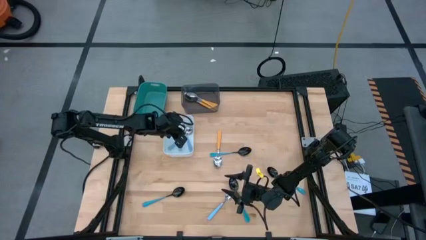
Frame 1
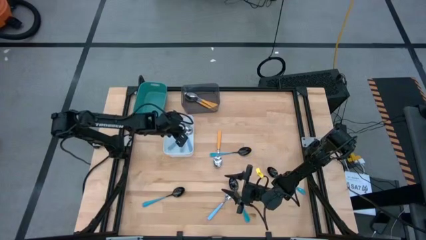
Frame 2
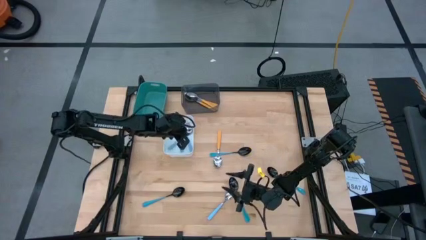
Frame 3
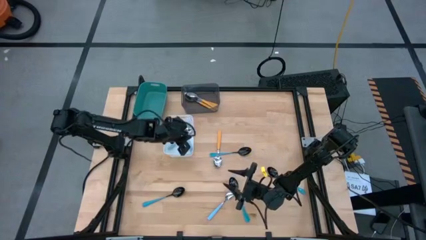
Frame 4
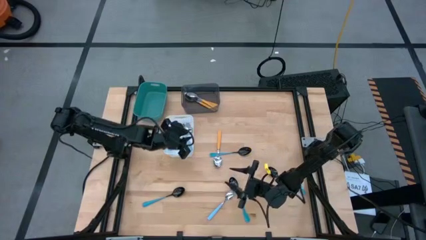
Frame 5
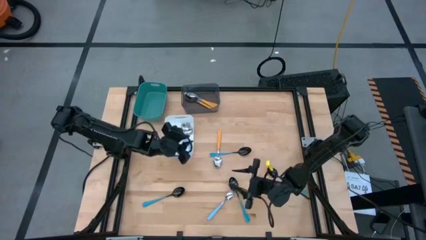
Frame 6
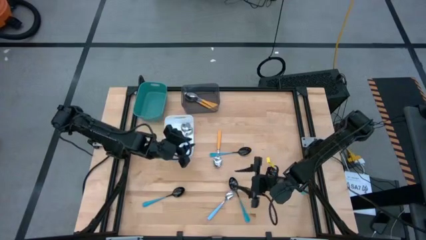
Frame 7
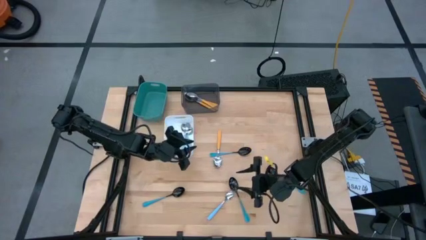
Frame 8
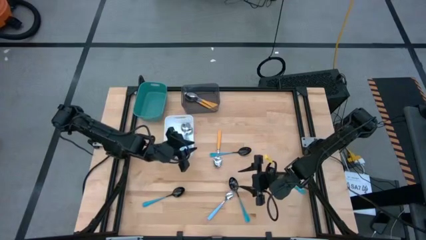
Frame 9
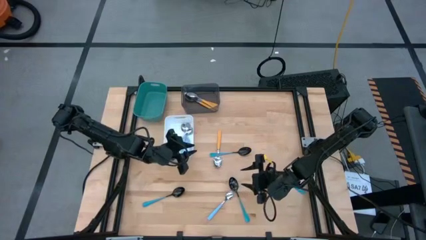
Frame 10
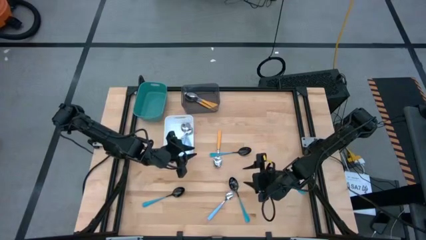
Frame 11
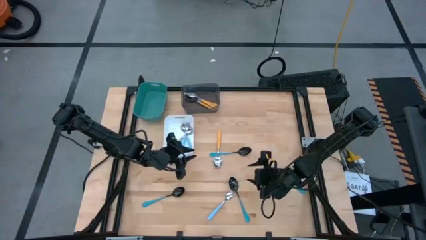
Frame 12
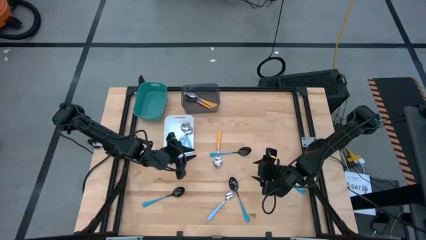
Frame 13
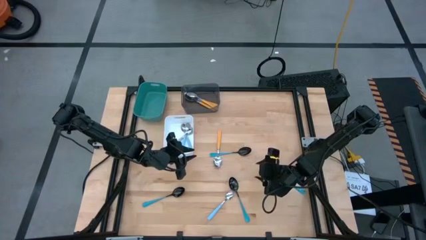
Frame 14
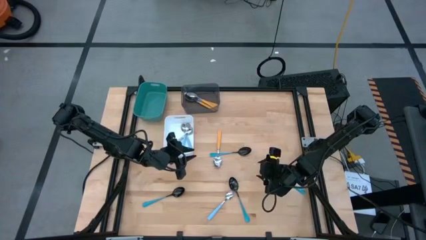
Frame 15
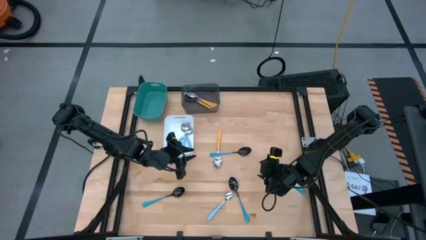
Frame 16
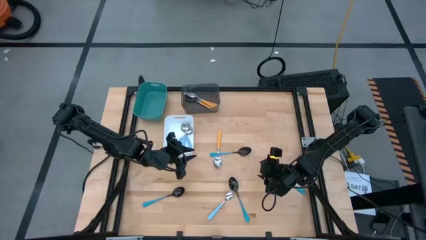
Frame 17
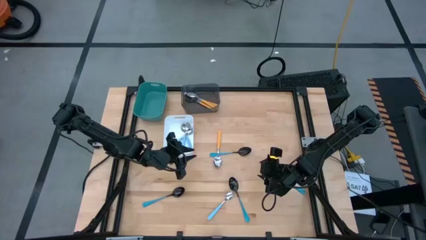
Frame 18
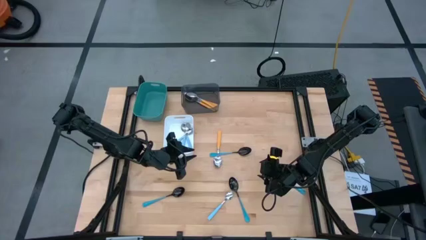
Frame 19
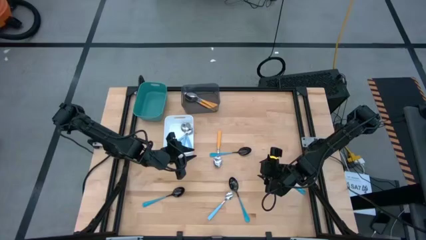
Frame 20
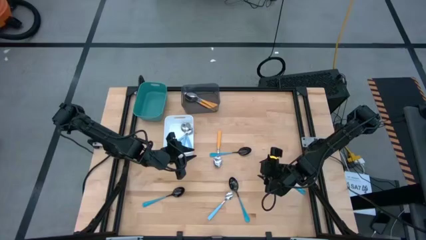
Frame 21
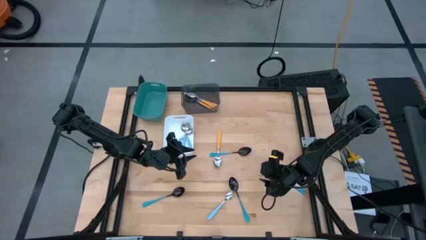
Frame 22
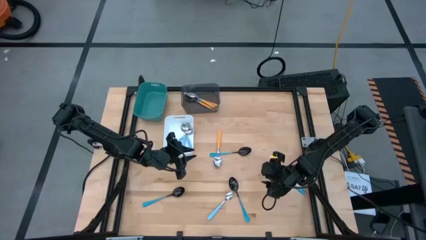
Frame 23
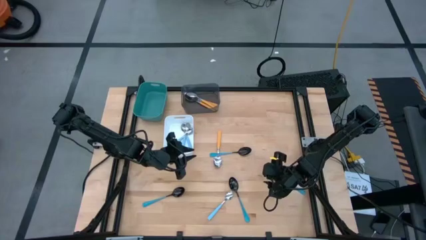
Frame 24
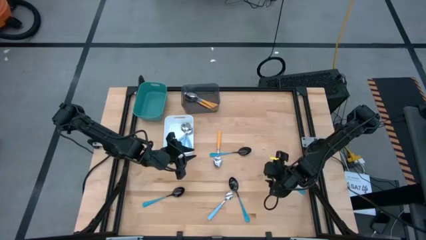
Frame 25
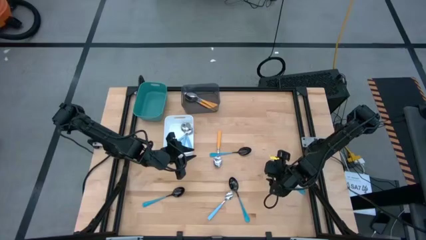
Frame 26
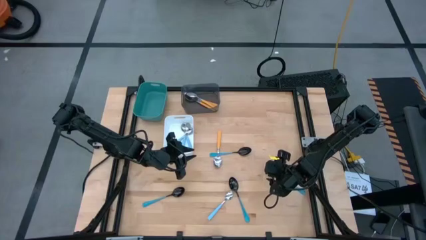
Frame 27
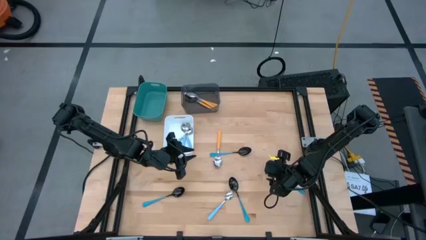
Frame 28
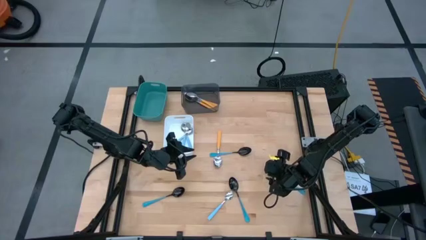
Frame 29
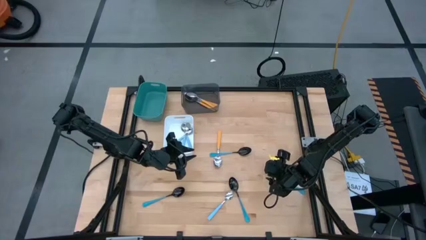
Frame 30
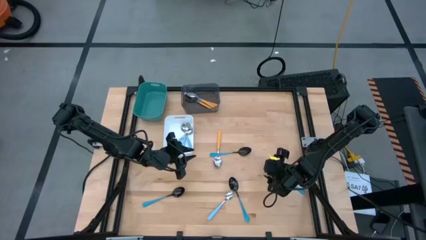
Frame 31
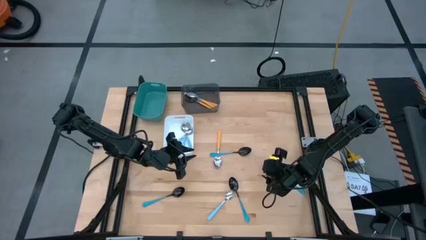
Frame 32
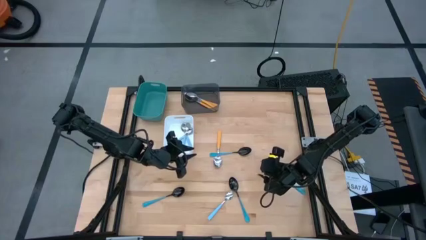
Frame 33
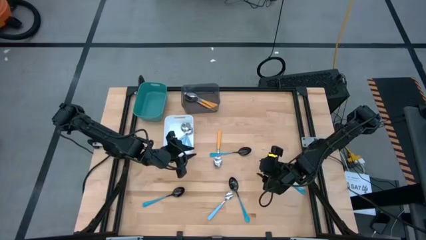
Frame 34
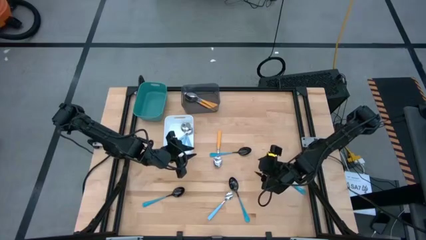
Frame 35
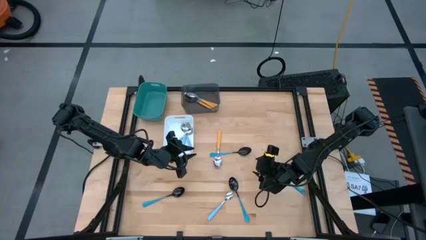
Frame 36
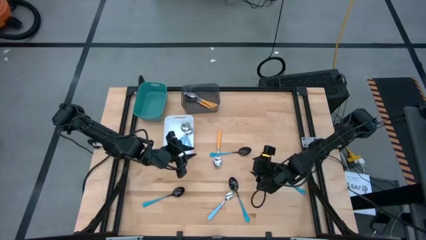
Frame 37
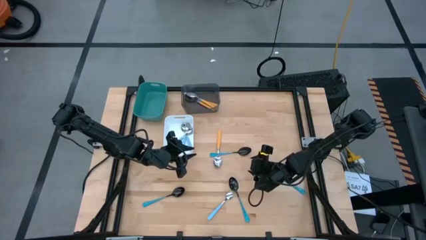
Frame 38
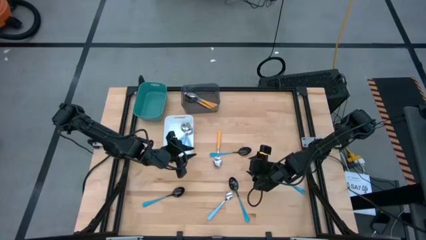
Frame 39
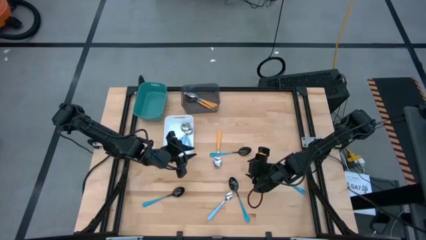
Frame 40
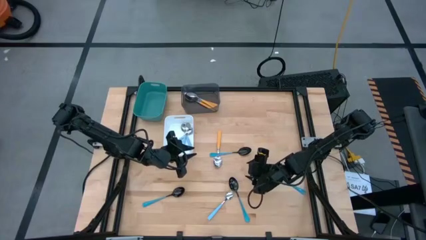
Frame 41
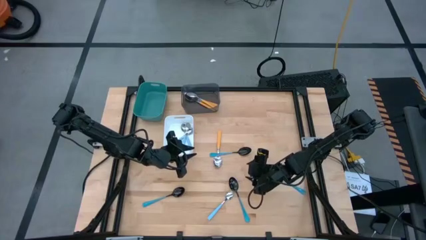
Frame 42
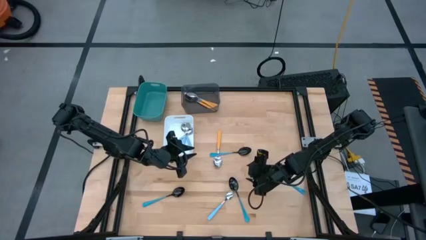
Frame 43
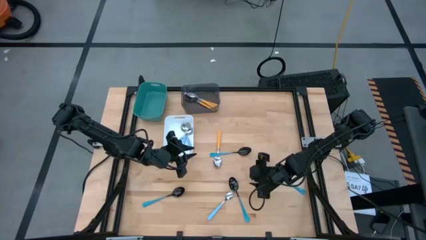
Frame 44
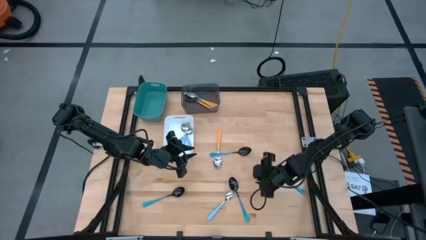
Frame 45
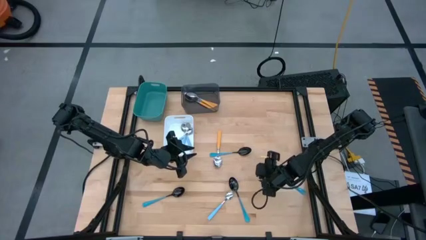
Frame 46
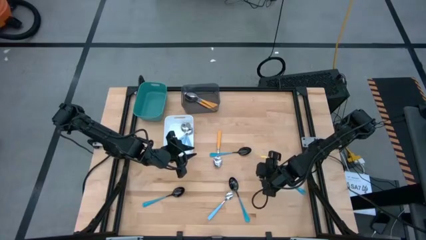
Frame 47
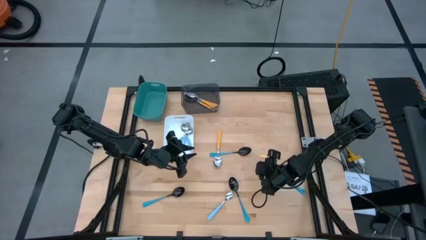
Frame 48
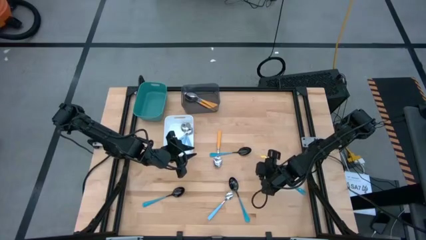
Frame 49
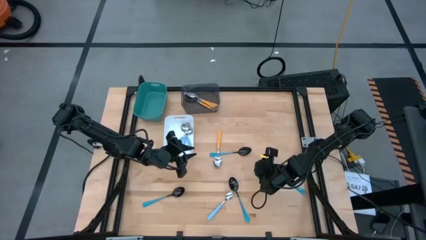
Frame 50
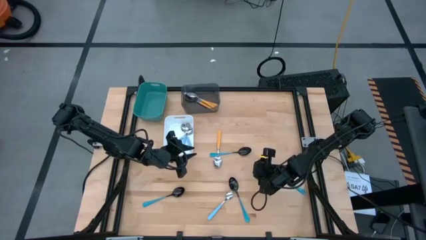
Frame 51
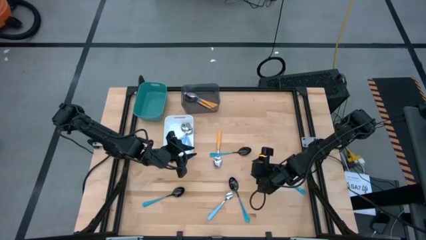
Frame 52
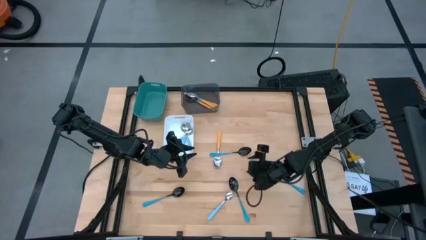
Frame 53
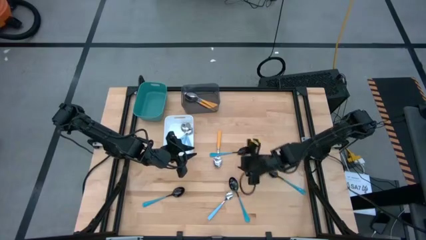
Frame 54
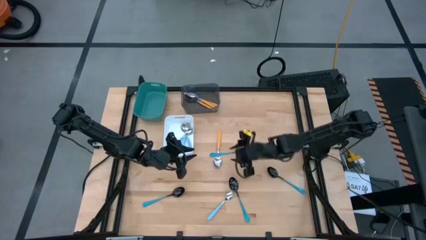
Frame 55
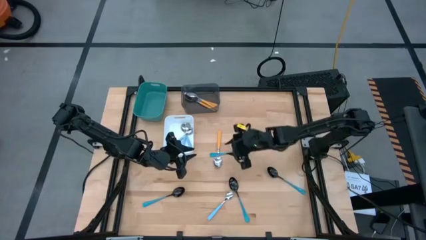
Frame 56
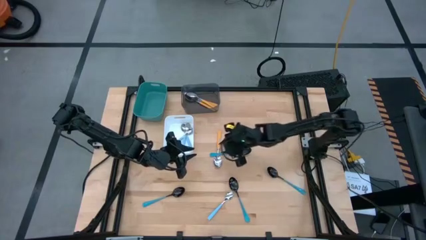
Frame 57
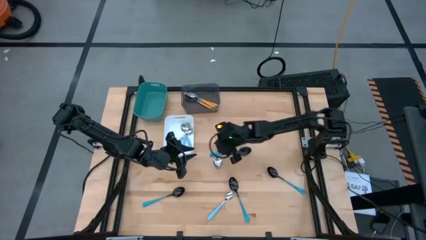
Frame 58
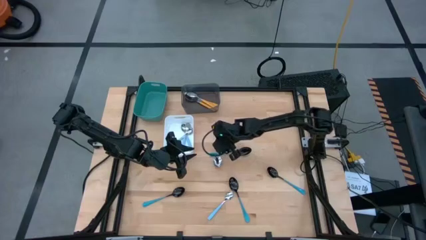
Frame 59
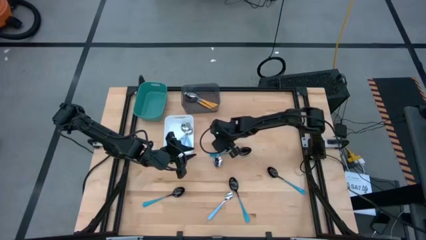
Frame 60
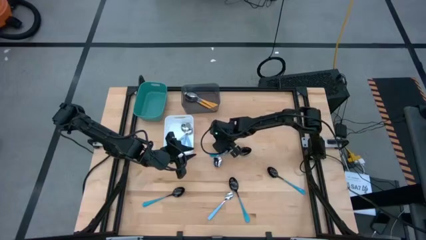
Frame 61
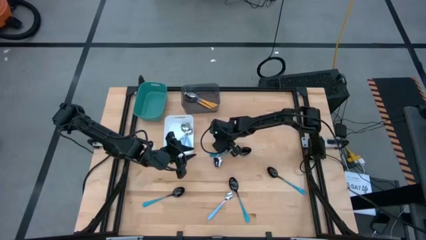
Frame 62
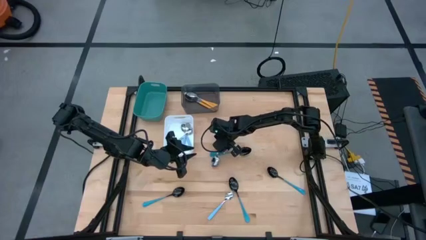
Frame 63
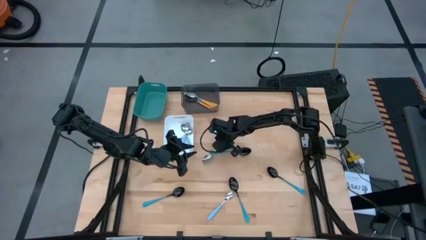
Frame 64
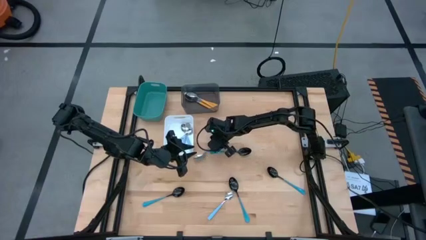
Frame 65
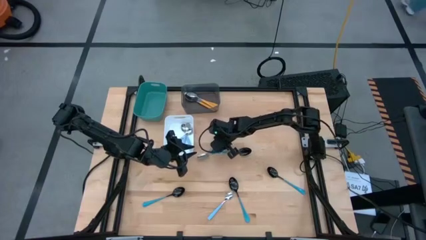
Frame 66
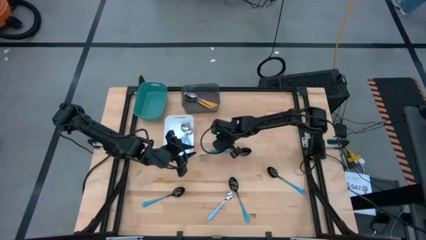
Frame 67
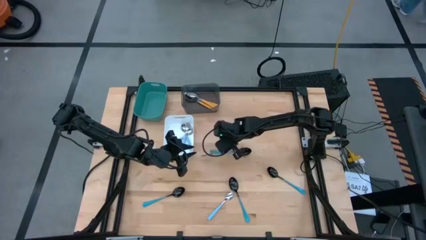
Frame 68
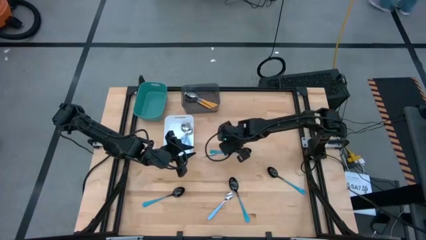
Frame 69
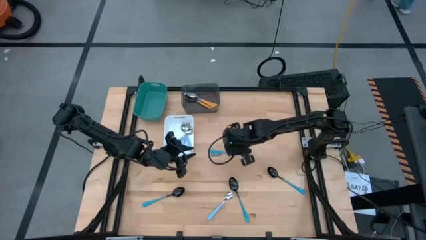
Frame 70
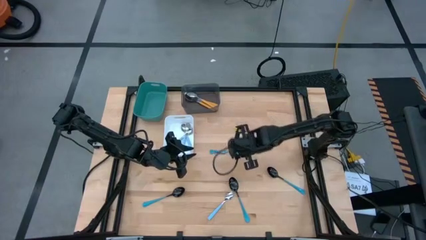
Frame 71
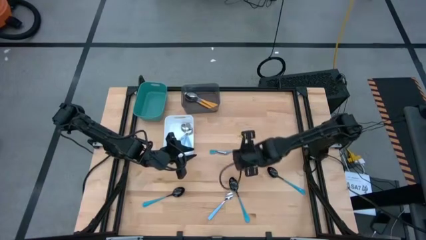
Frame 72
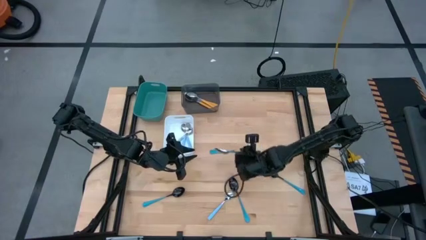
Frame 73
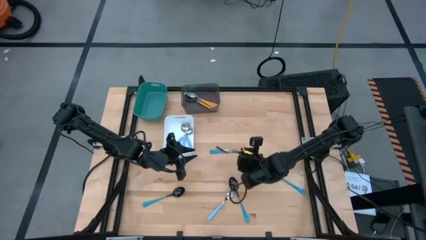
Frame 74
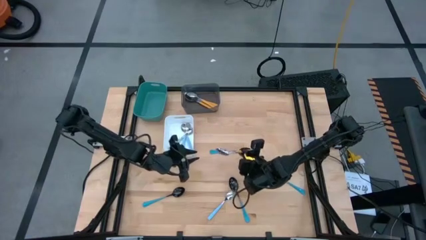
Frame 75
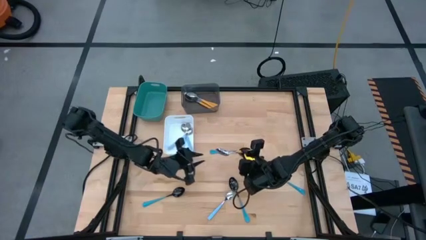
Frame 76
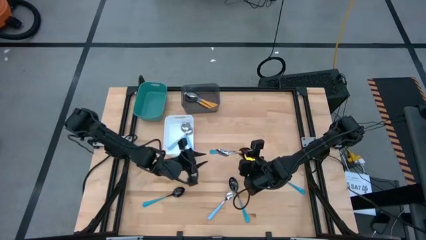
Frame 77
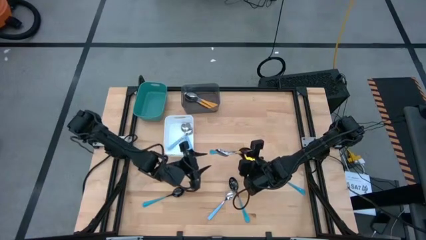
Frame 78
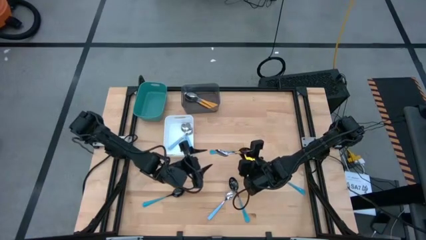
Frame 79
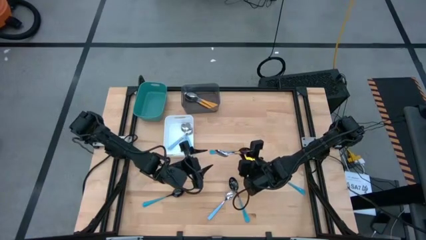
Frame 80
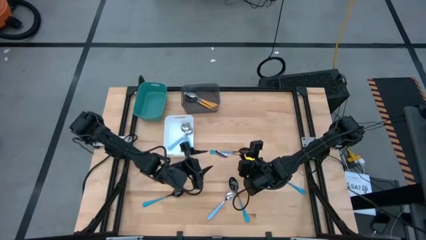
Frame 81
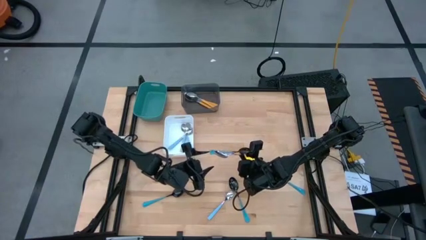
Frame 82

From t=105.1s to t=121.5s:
Task: Sort silverware by color (type)
Put the orange spoon into the black bin

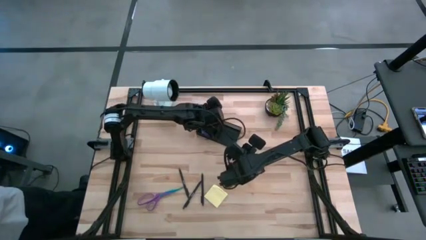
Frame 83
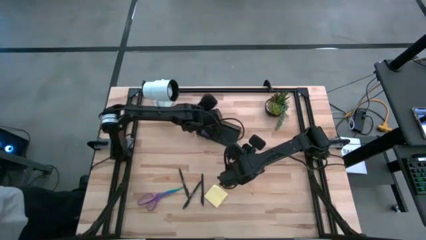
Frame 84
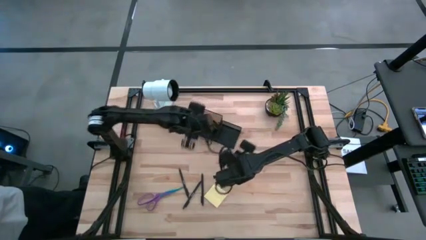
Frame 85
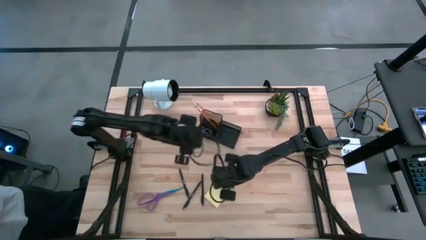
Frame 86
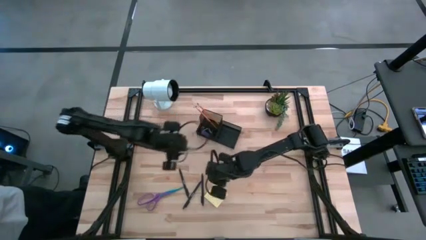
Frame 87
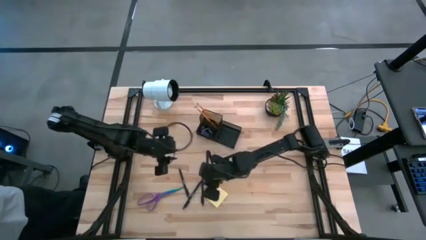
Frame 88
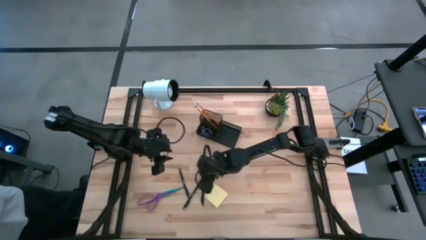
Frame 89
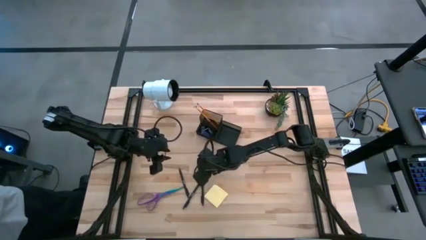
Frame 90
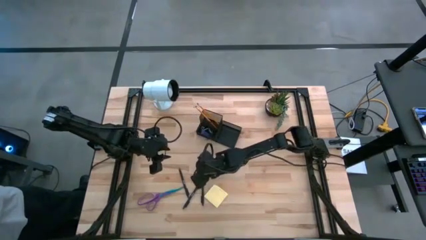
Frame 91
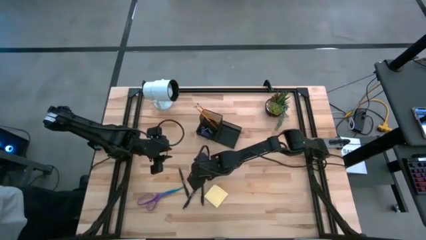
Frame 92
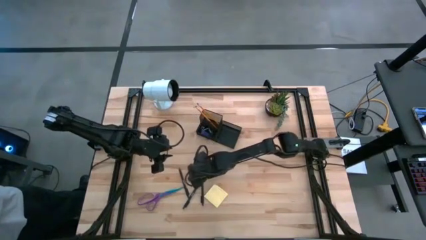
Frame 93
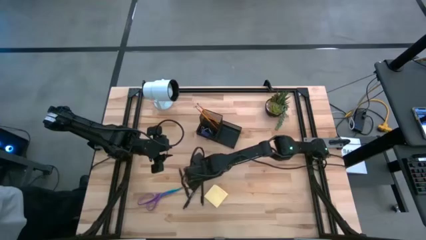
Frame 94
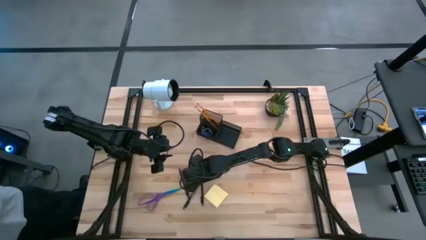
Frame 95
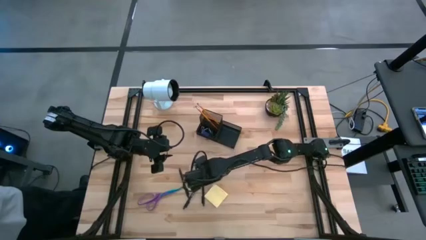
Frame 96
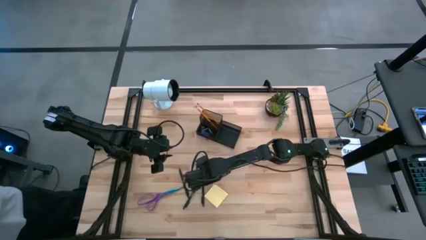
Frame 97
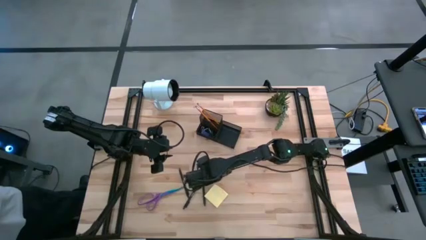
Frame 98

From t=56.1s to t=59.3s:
Task: Pick and place office supplies into organizer
Put the right black pen into the black desk organizer
